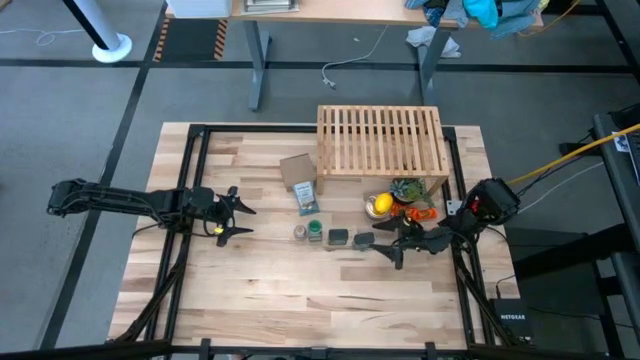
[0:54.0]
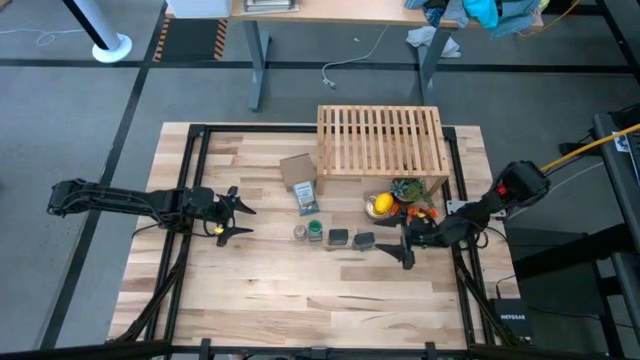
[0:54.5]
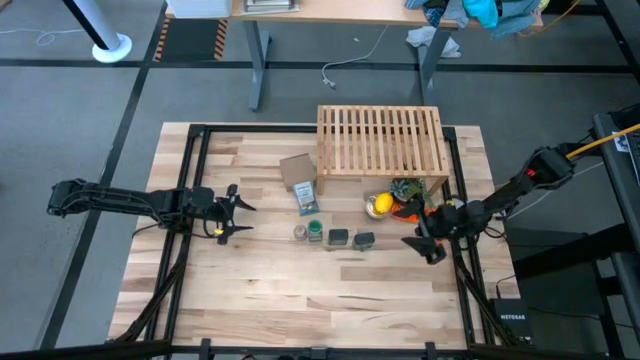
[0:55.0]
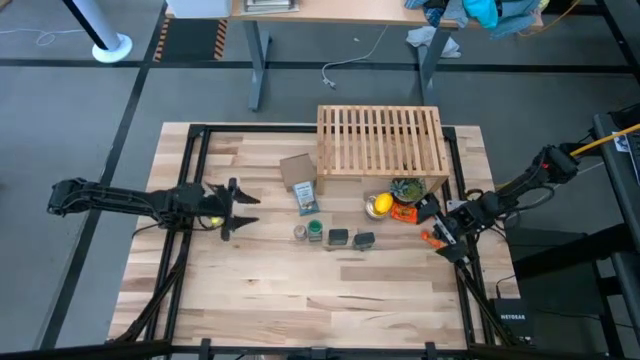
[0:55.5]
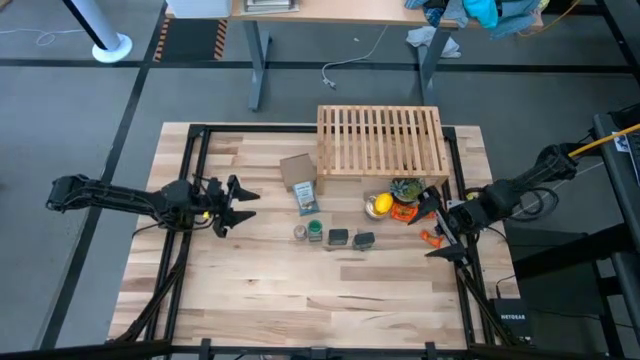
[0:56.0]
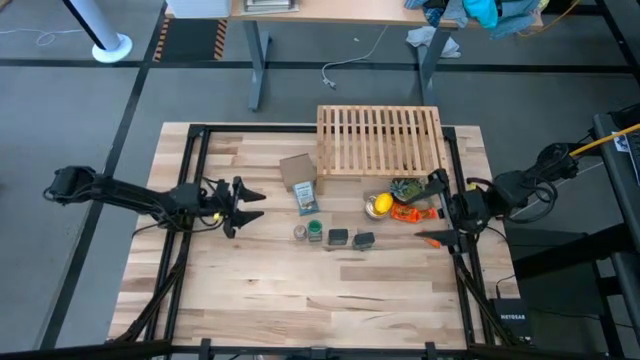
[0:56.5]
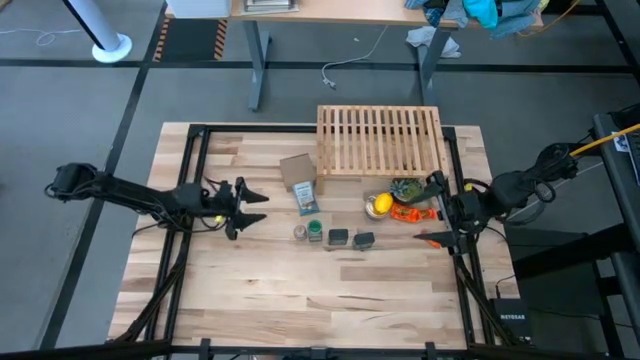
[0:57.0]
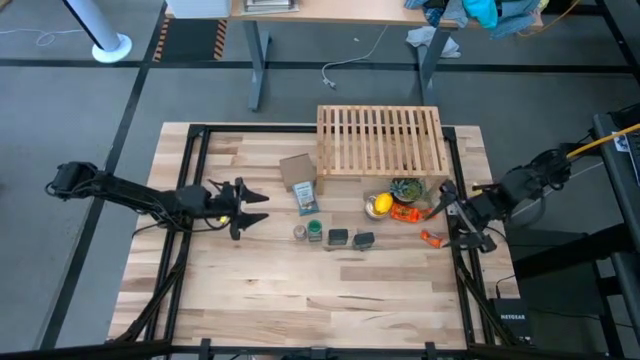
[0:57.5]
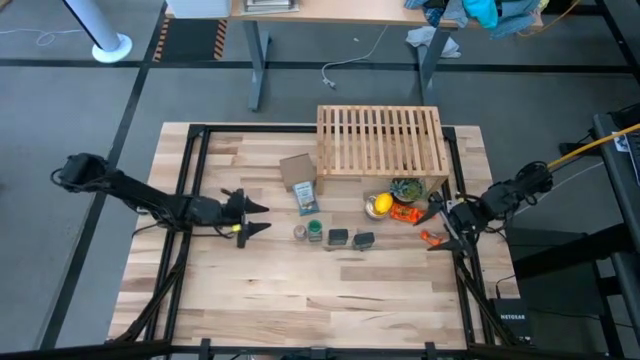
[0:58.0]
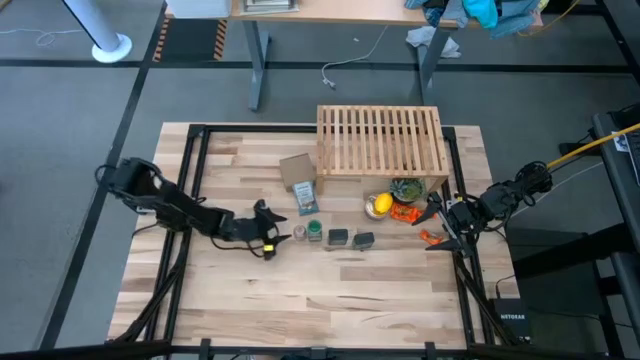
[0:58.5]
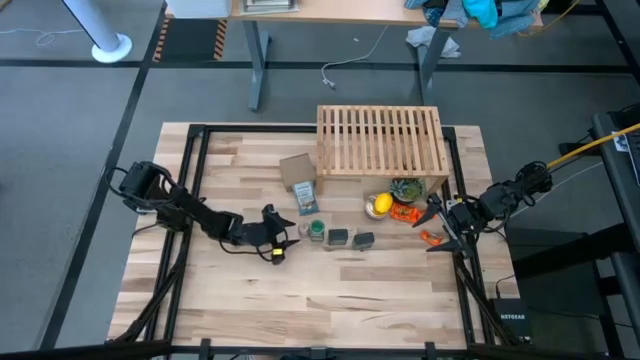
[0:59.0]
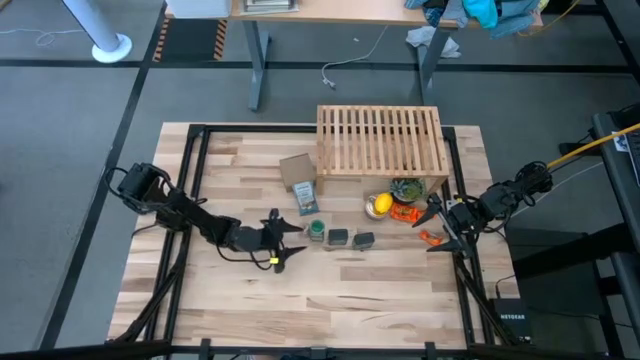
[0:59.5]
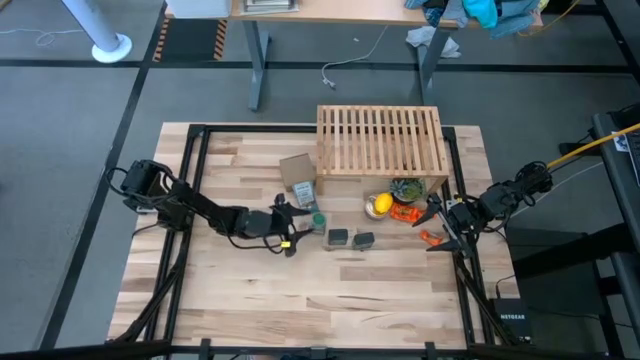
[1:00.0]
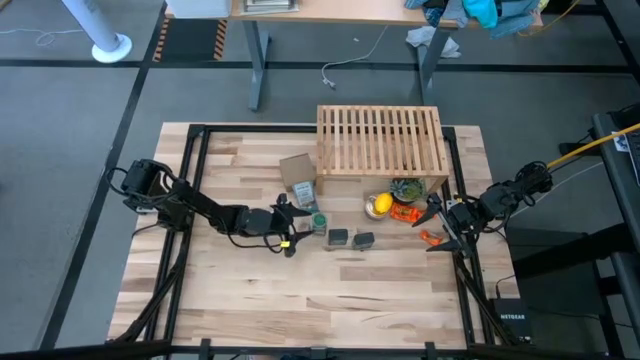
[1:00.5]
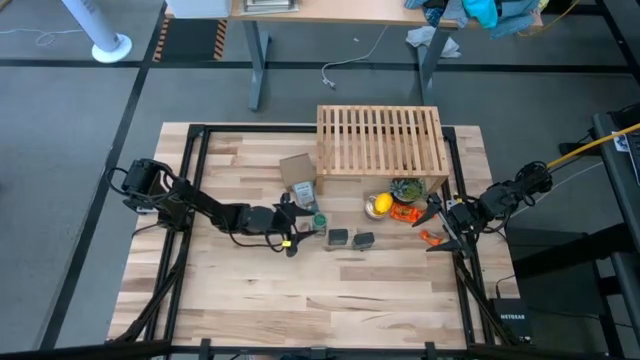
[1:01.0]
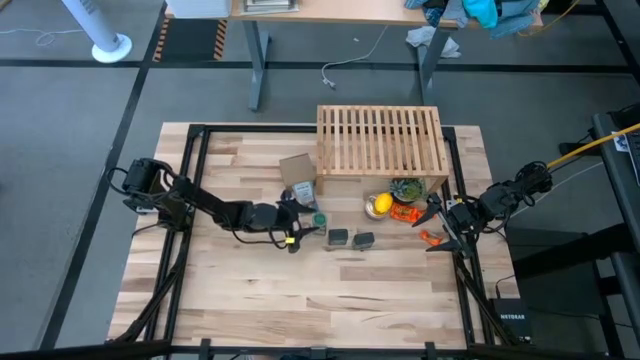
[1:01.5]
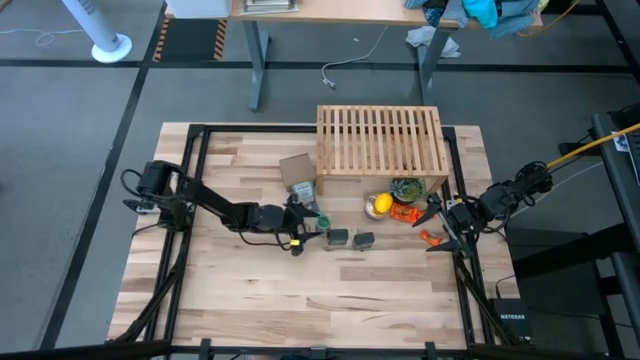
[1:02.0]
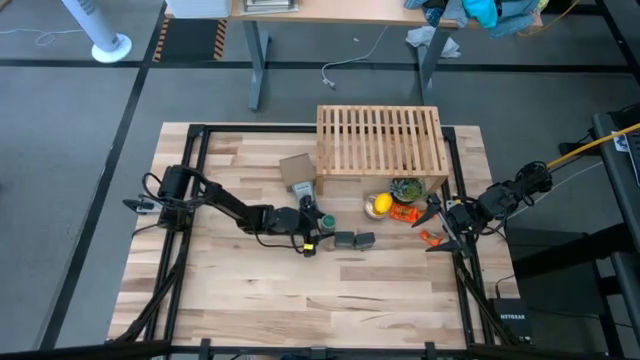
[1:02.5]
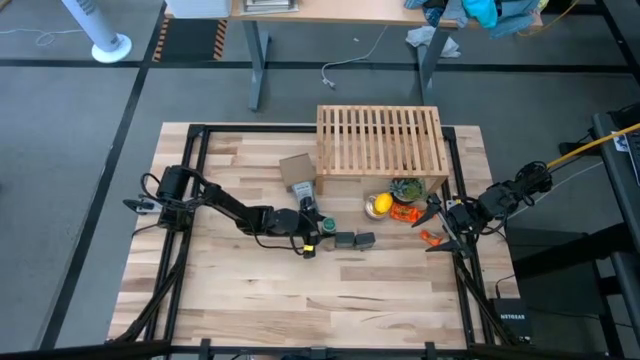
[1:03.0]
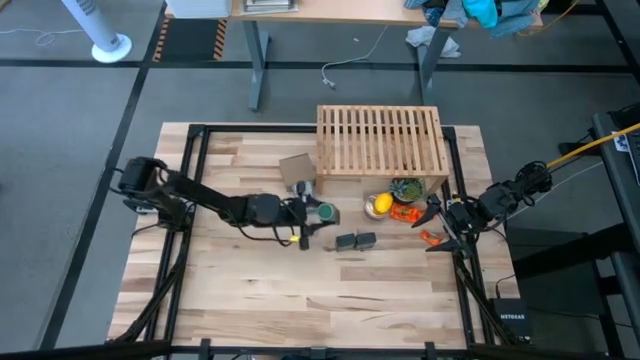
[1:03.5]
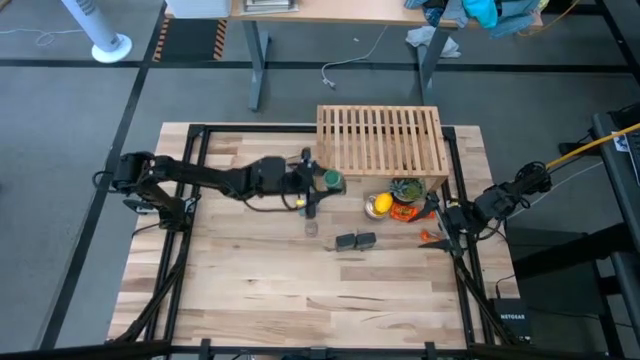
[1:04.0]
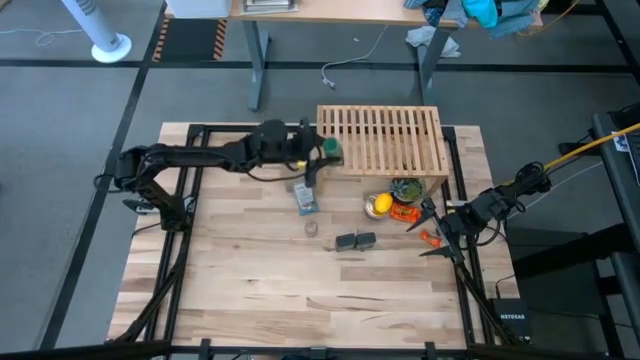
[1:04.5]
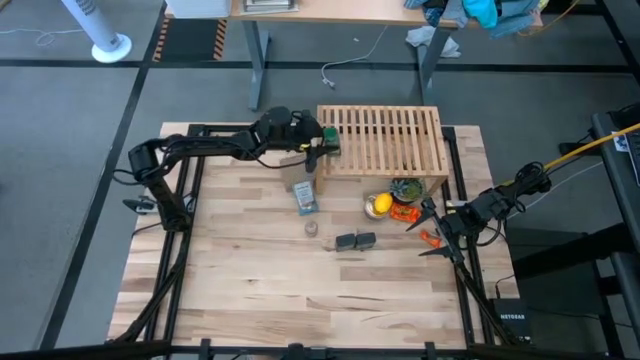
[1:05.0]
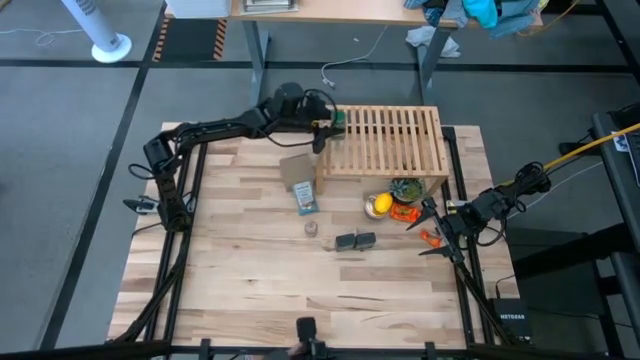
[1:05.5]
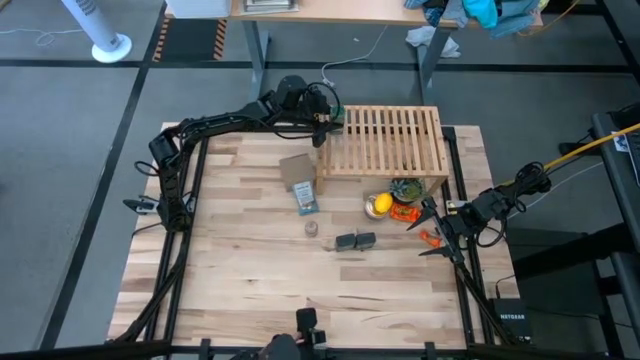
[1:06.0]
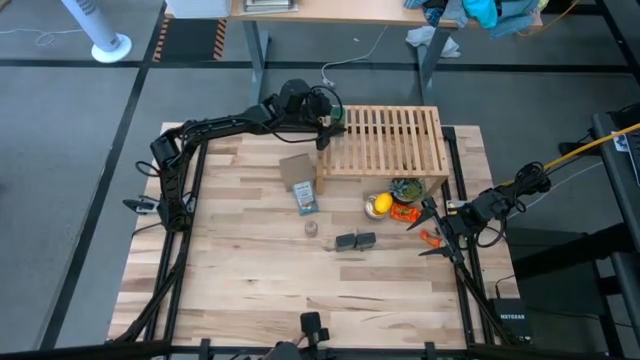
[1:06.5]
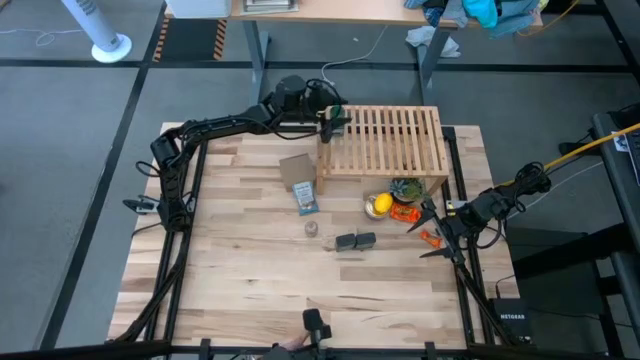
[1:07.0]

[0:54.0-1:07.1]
Task: Shelf spices
Put the green seasoning bottle on the shelf

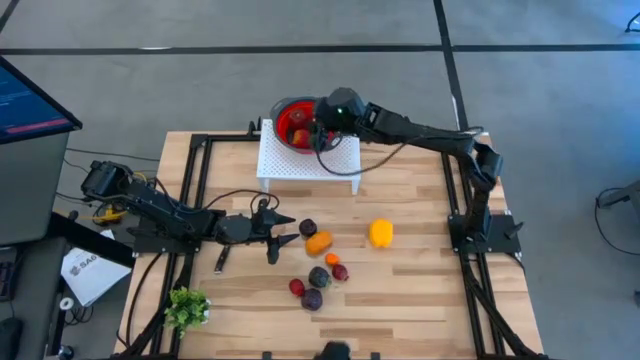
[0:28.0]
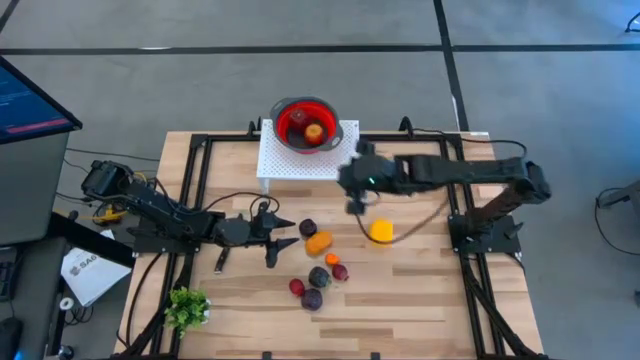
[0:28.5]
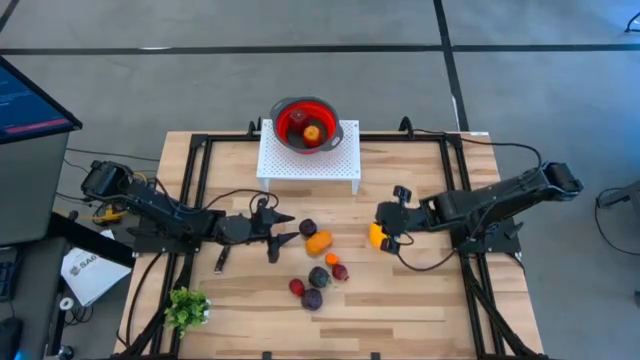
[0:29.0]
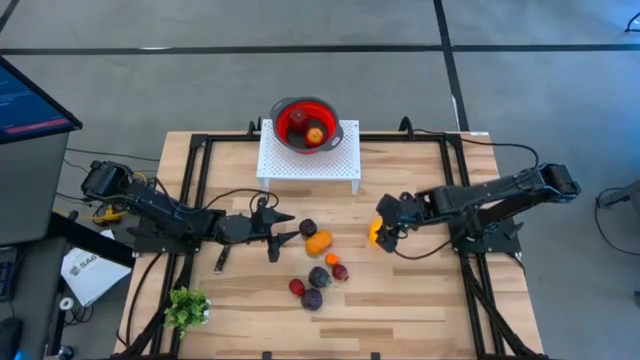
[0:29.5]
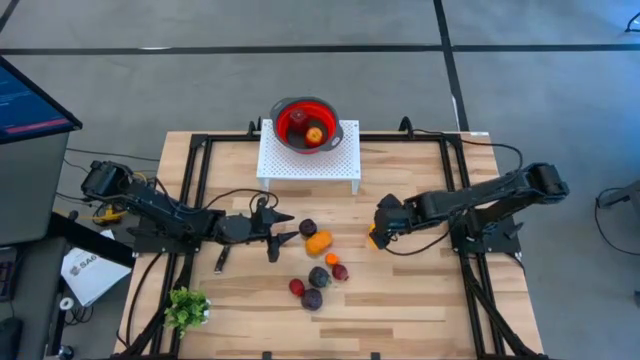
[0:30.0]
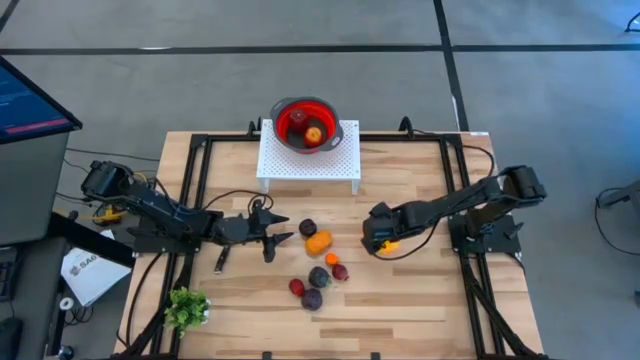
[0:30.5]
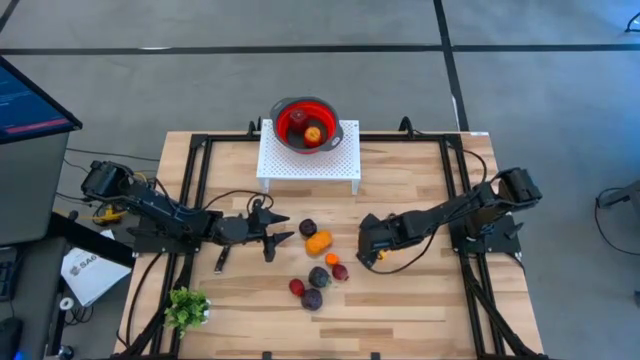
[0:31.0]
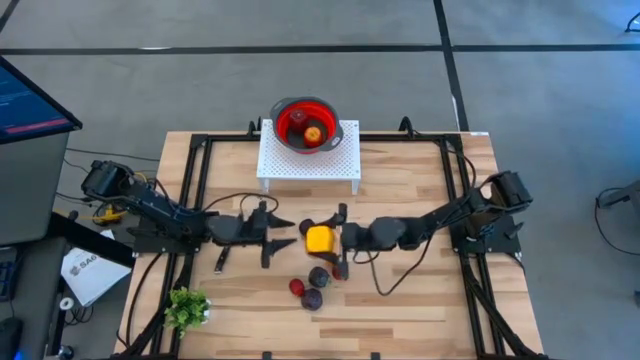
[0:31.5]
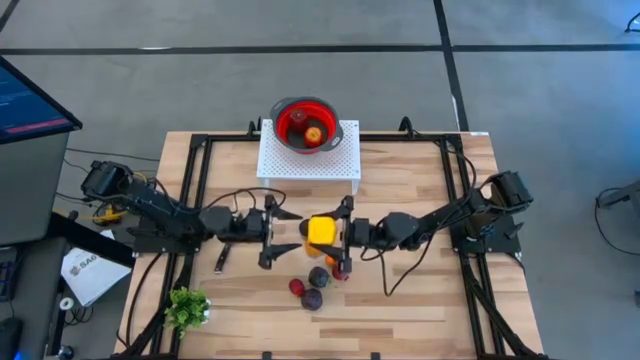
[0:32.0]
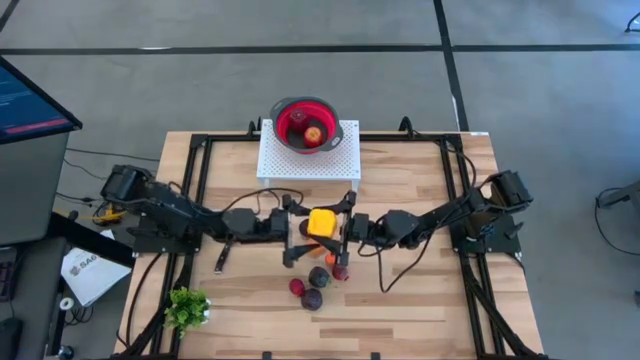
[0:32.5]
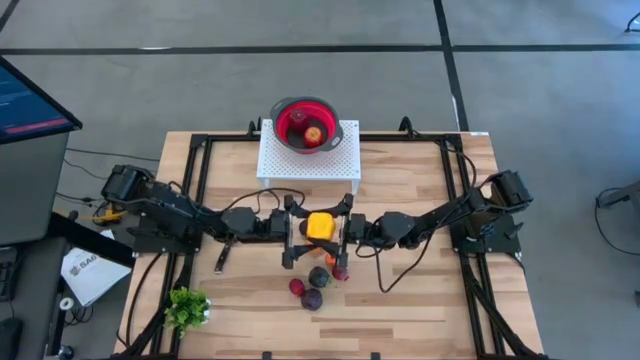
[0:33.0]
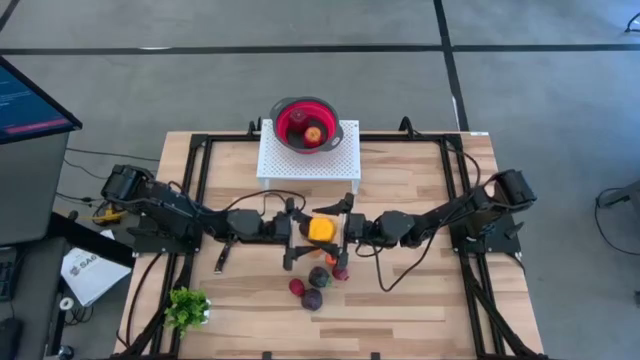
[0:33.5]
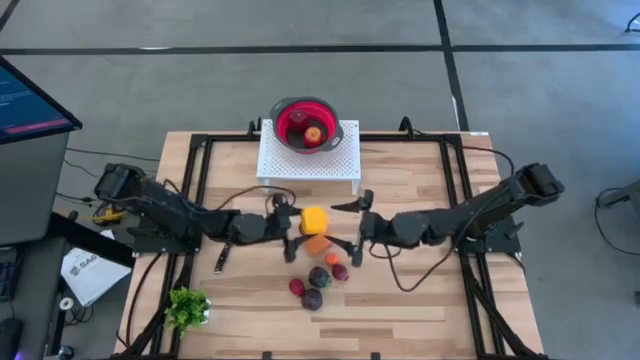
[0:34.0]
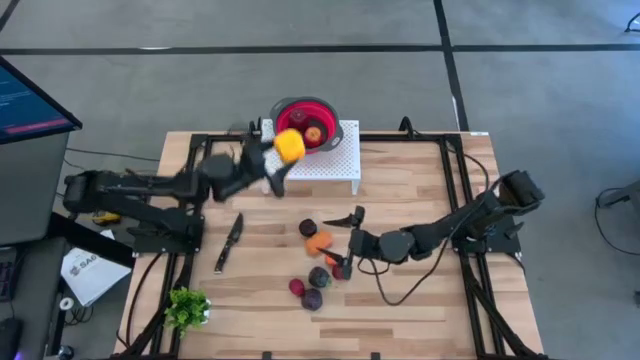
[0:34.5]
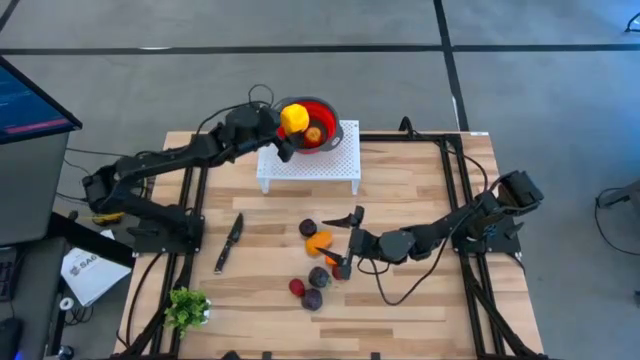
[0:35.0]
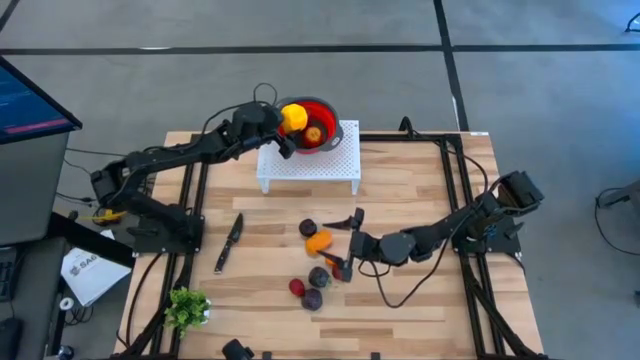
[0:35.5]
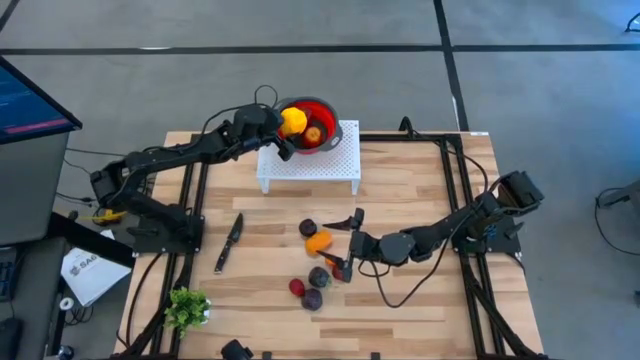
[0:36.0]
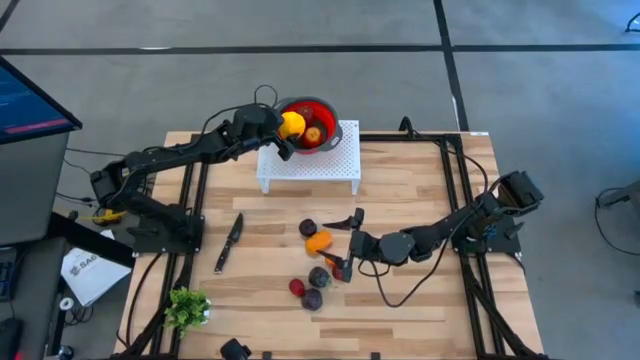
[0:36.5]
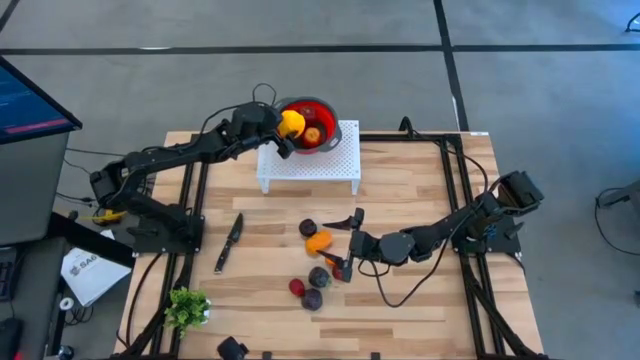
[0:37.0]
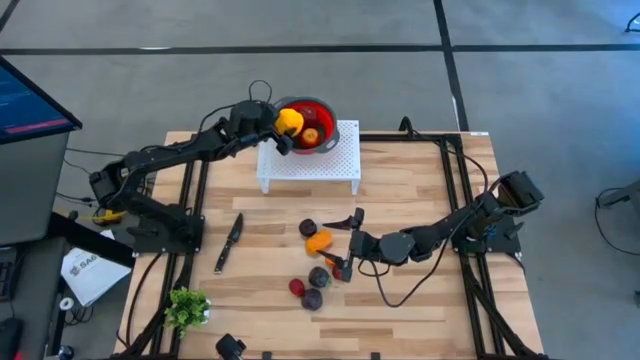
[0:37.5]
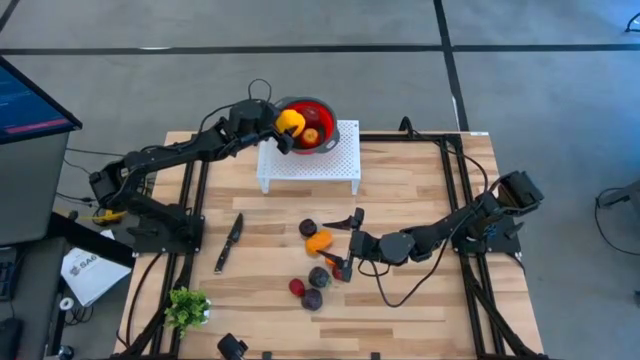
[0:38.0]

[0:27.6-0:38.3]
Task: Pick & Place Fruit
Put the yellow bell pepper into the red strainer bowl on the shelf
